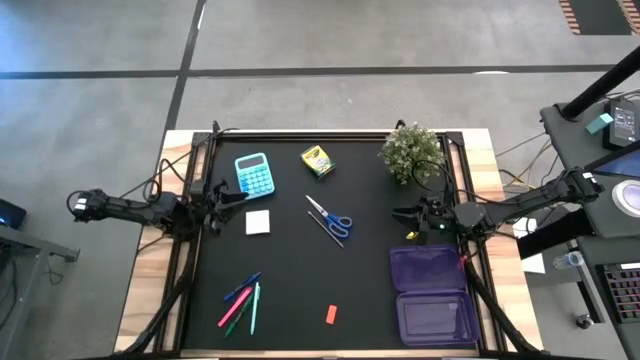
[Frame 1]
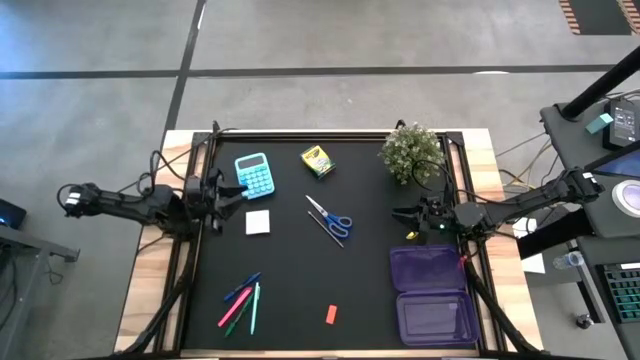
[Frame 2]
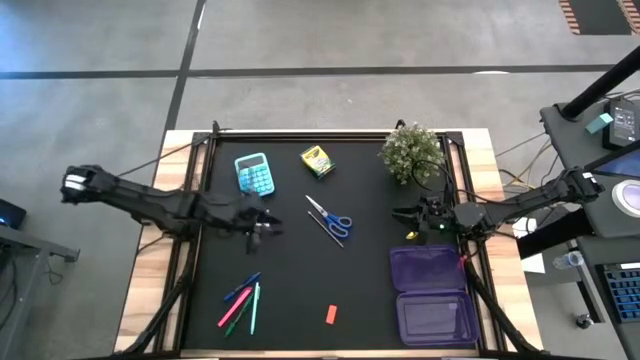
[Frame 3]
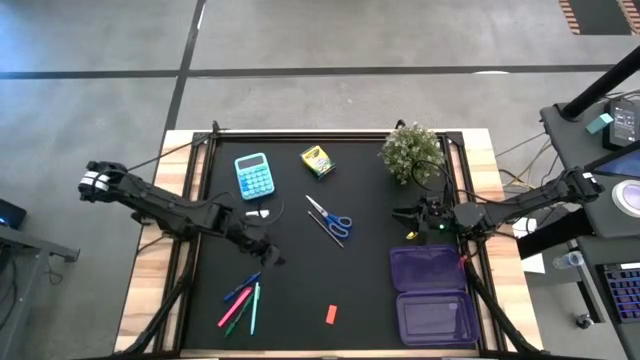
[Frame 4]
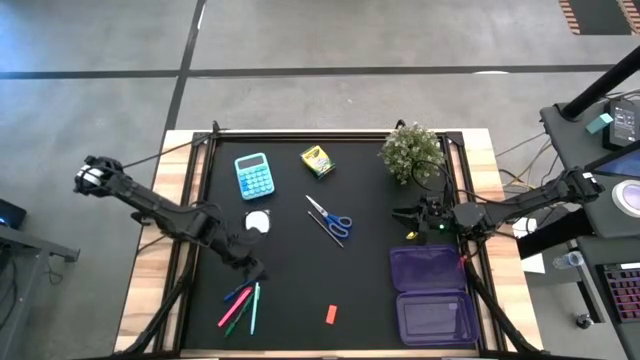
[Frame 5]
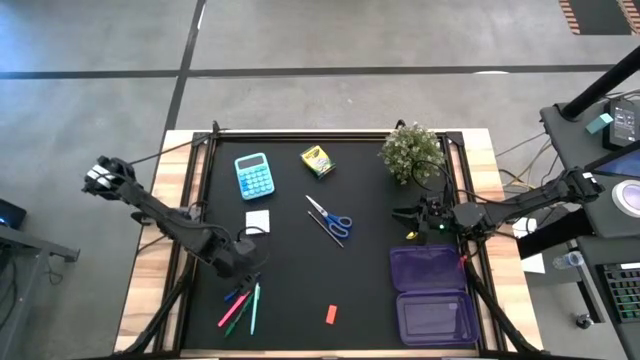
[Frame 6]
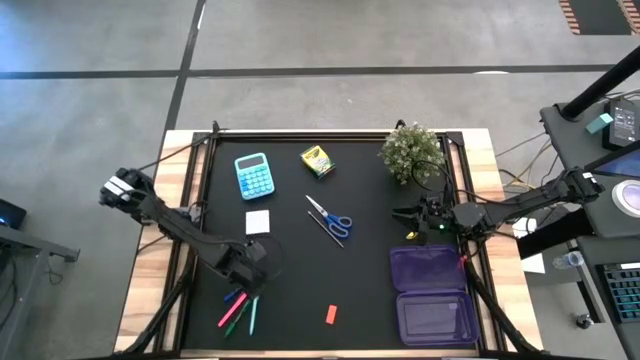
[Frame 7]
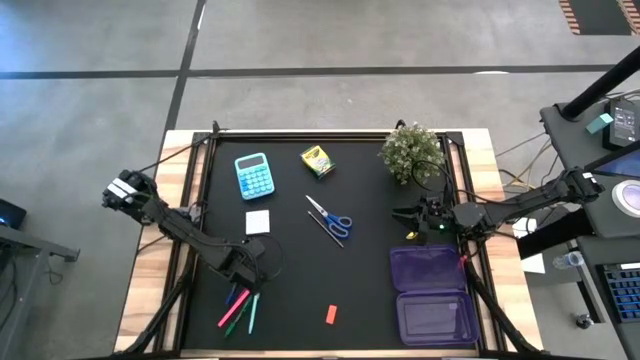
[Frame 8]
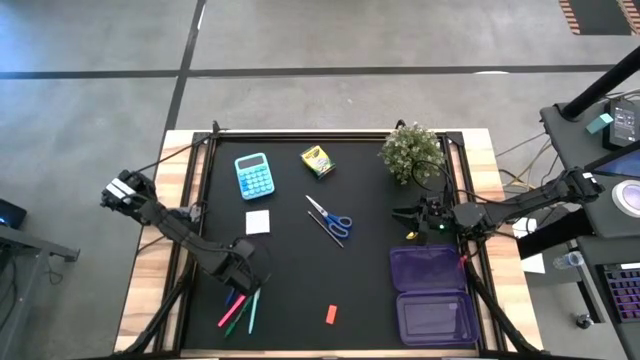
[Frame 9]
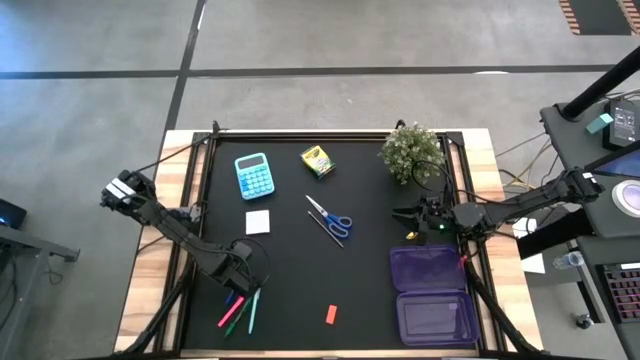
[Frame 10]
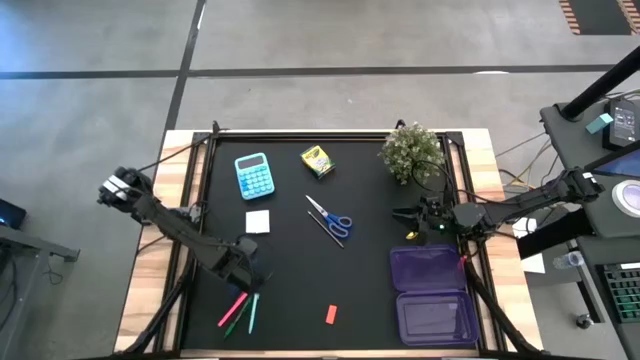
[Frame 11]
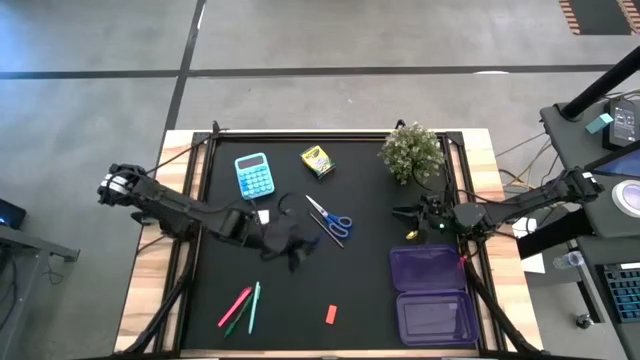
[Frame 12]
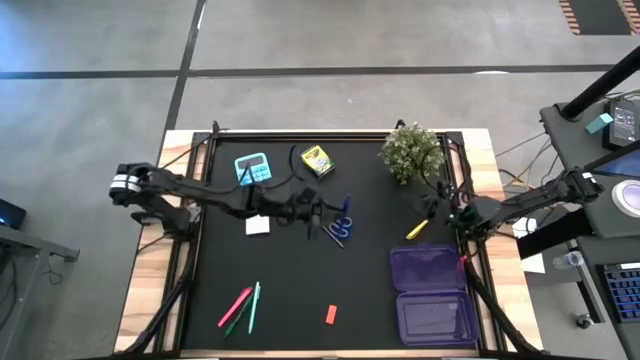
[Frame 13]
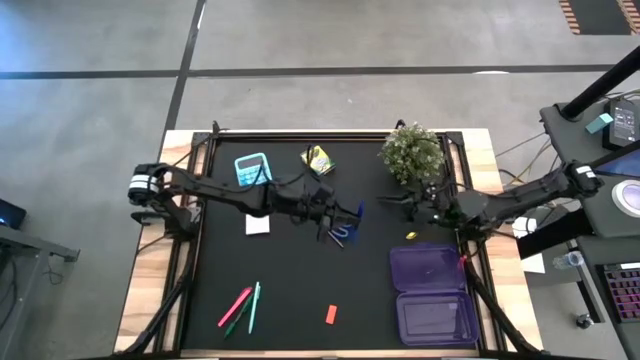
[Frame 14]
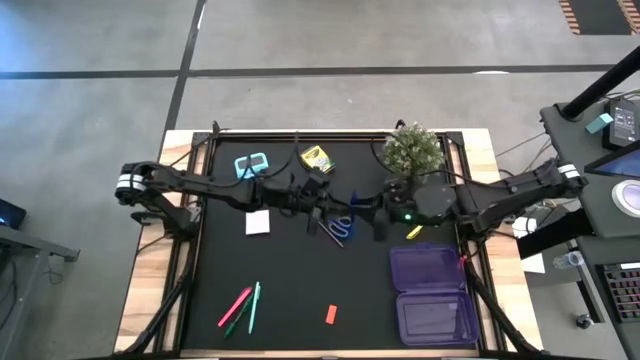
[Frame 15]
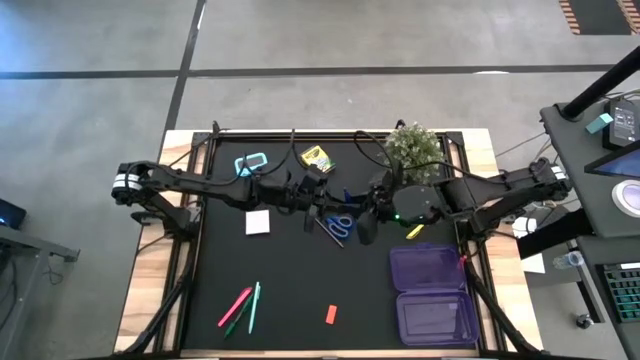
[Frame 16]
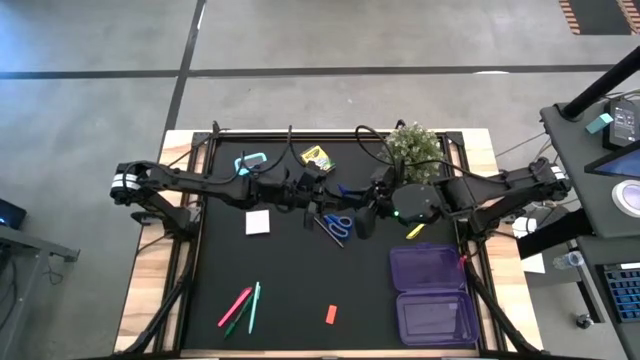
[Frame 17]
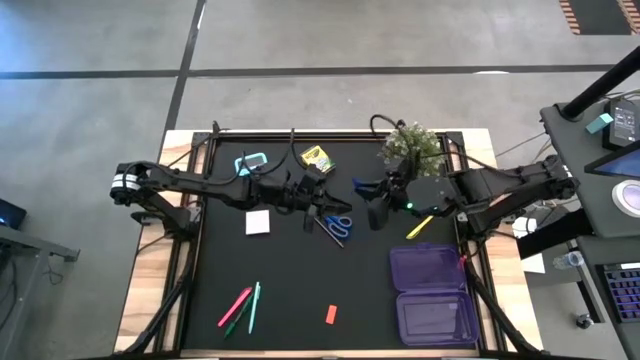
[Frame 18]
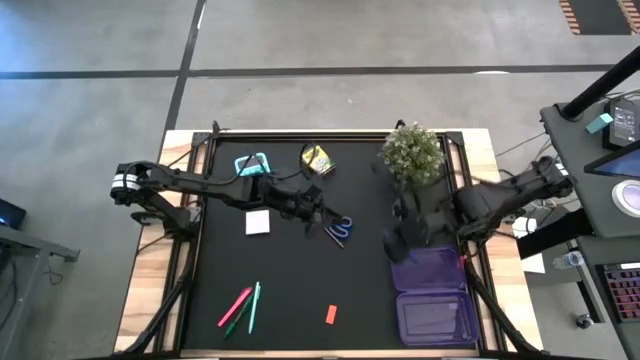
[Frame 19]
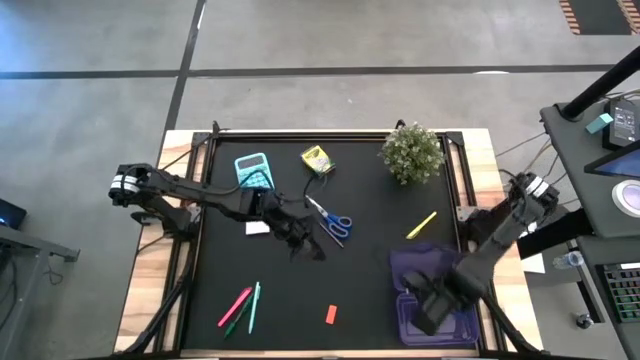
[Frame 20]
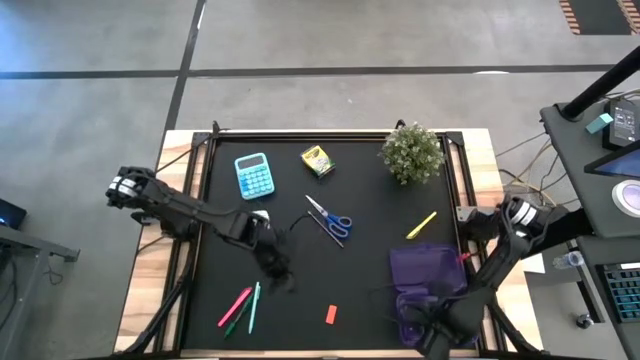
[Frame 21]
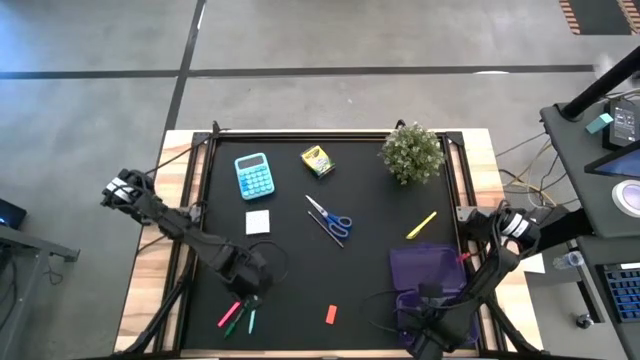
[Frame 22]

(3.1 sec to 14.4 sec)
Task: Pack school essentials
Put the blue pen into the supply box

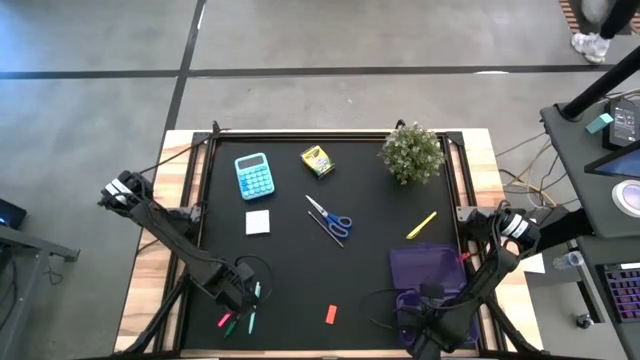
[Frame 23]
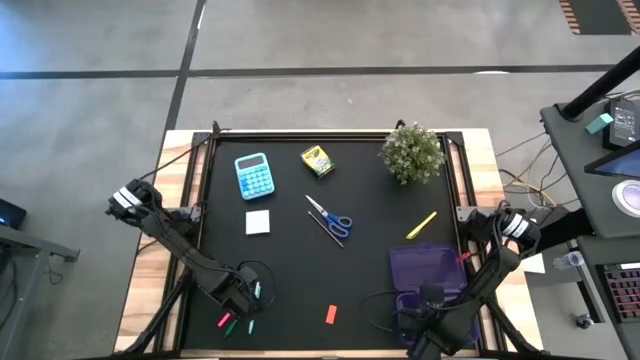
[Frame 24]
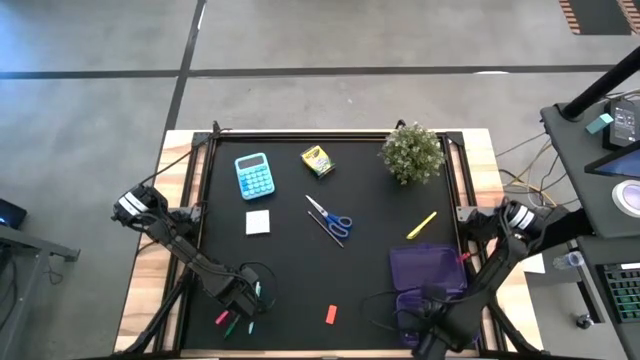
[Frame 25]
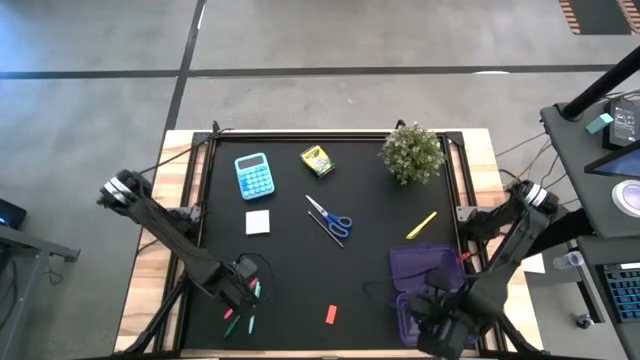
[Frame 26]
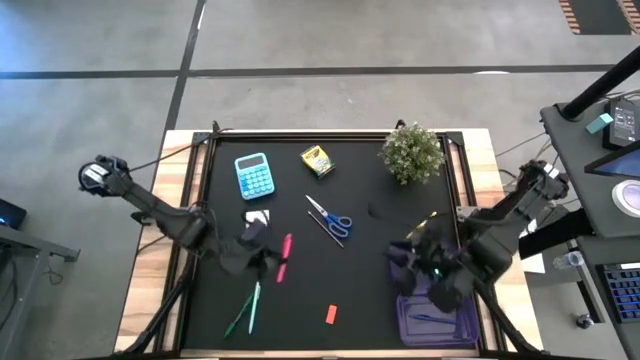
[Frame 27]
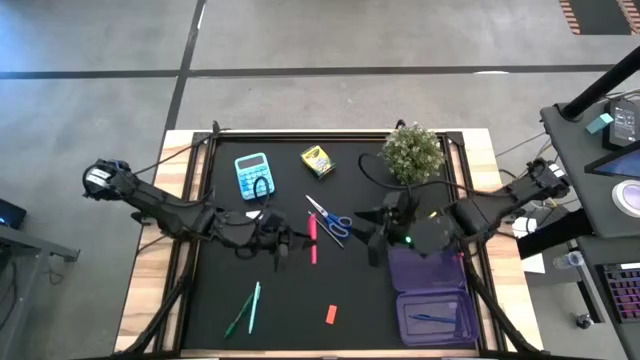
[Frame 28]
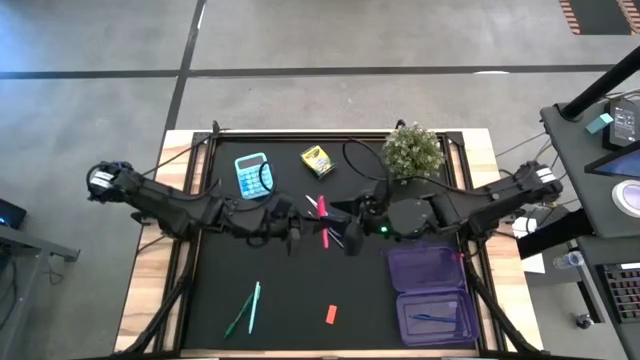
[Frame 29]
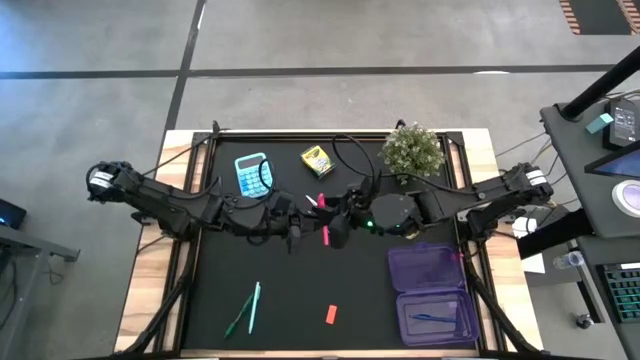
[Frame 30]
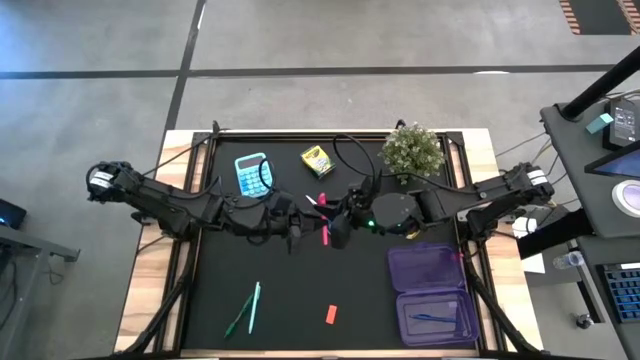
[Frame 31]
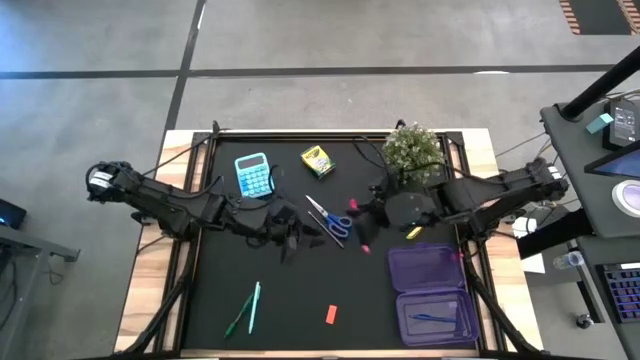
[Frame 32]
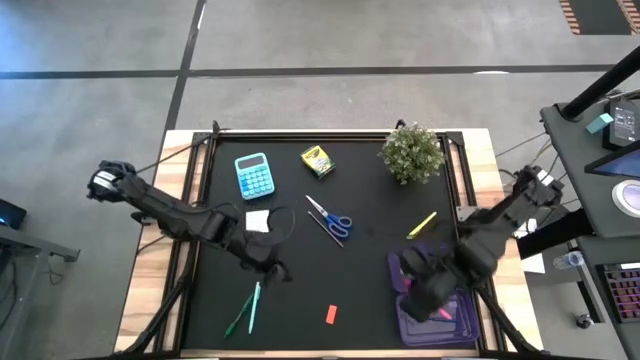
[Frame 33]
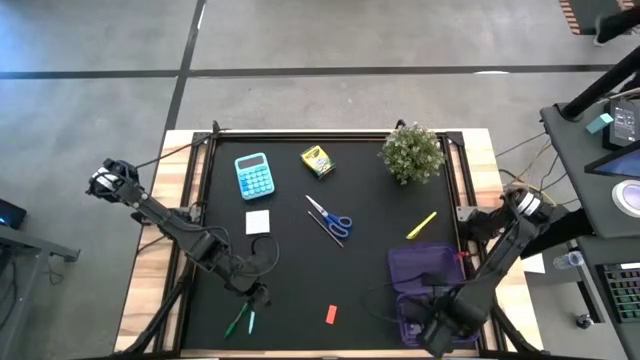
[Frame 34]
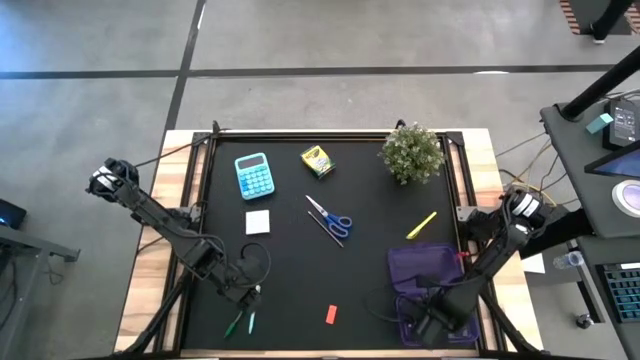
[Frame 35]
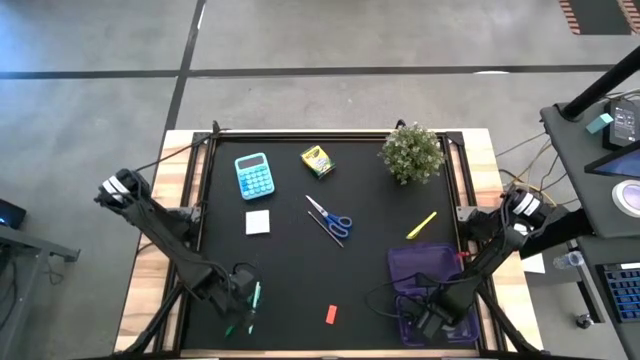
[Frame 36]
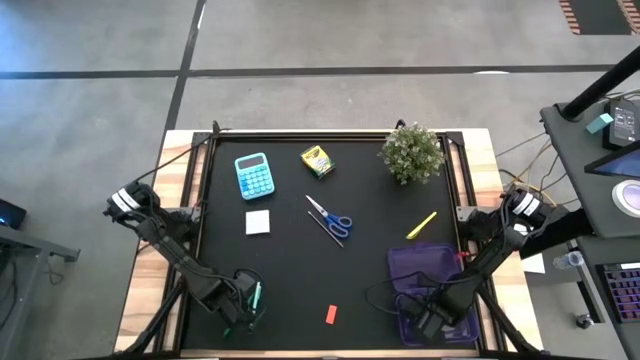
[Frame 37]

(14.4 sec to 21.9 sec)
Put the pink pen into the supply box

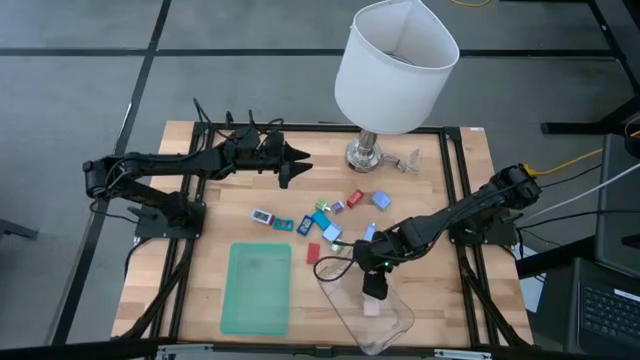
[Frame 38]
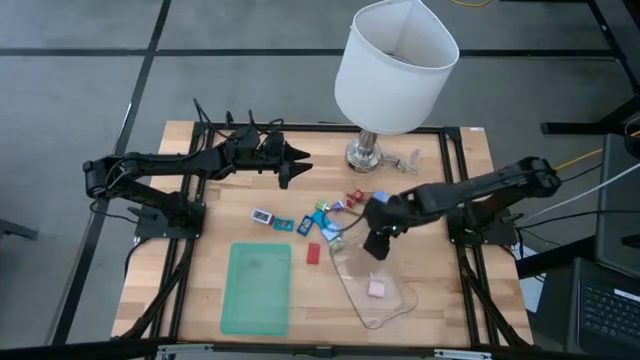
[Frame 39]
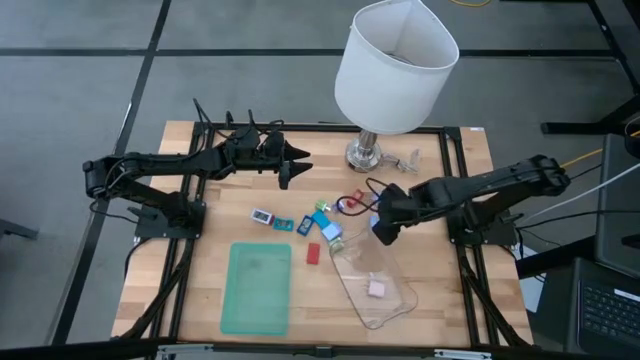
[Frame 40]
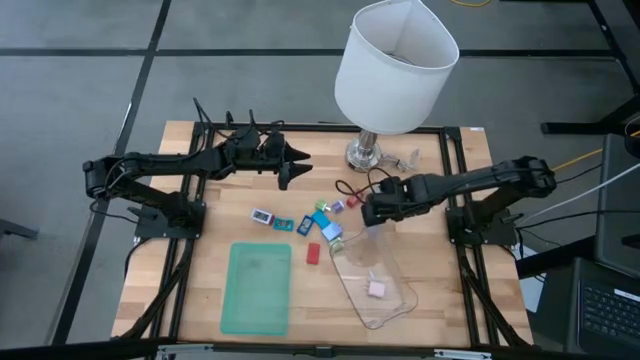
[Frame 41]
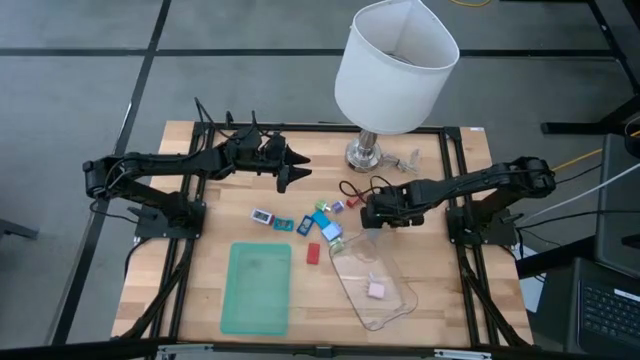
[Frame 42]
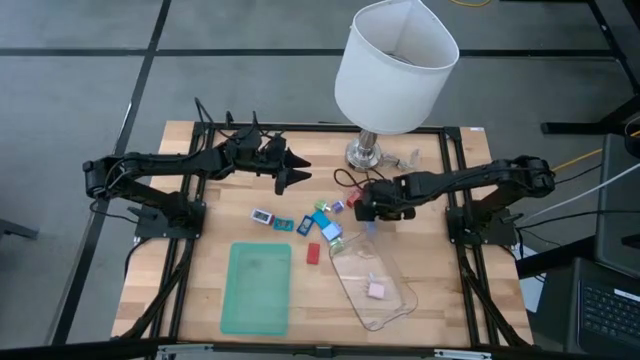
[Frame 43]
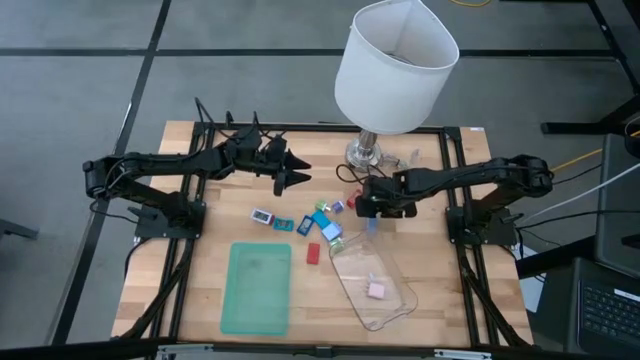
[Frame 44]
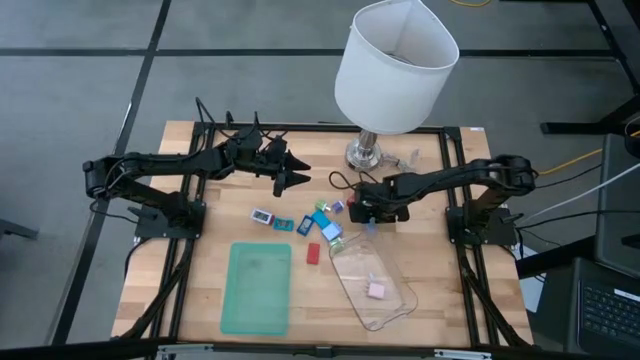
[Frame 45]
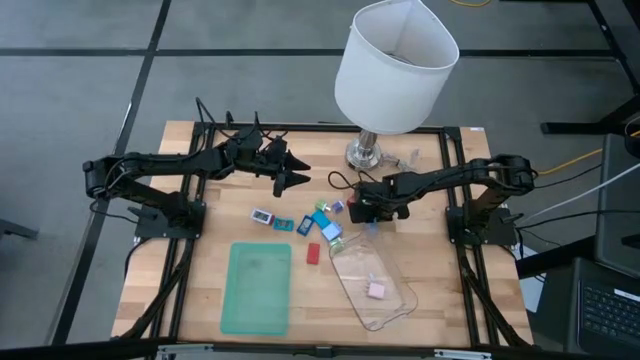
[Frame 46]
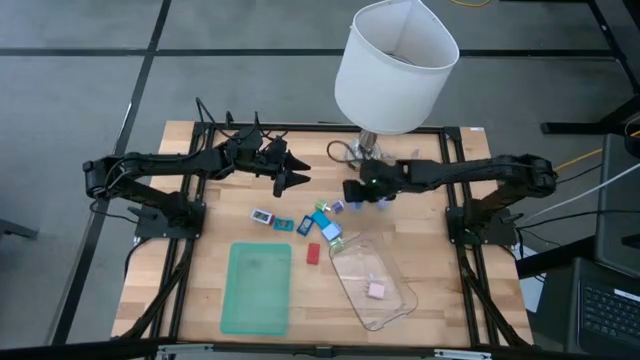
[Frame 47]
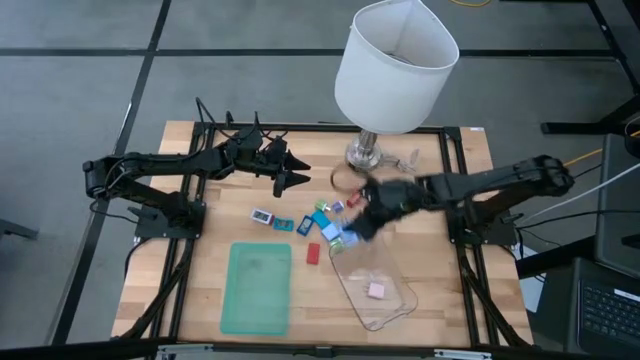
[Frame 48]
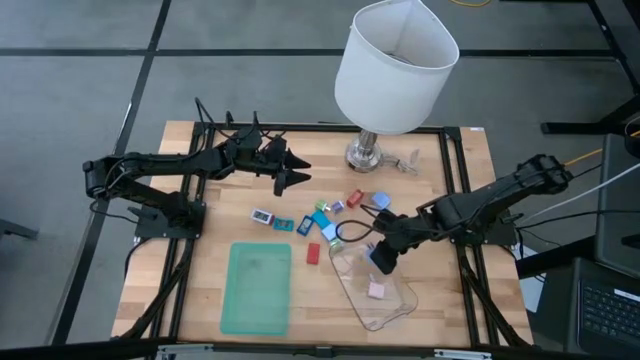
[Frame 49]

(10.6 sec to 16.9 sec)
Task: Pick & Place Office items
Put the middle light blue charger adapter into the transparent bin
